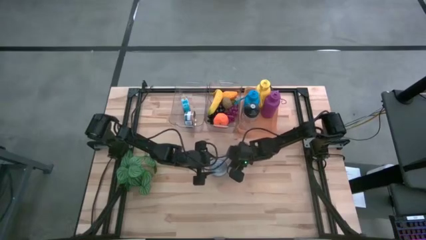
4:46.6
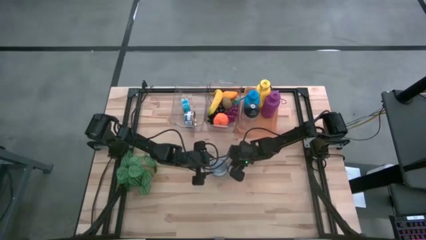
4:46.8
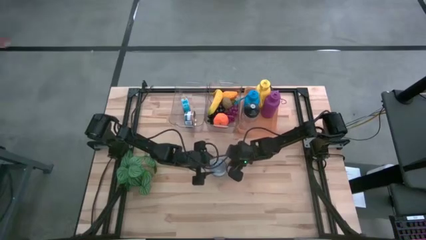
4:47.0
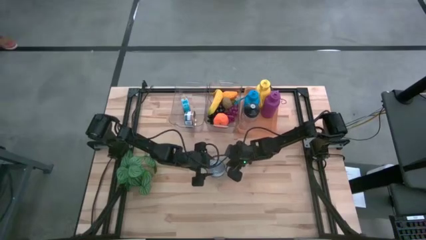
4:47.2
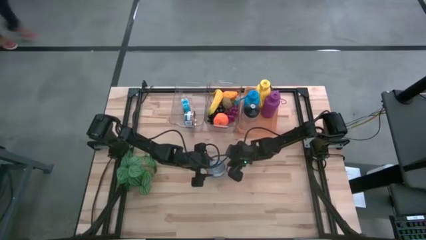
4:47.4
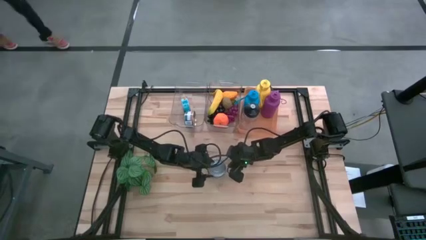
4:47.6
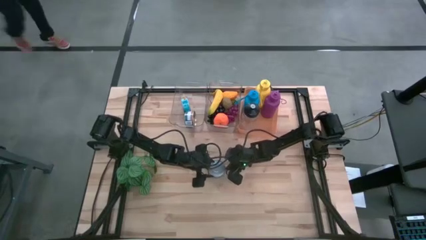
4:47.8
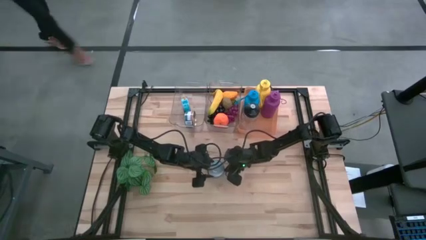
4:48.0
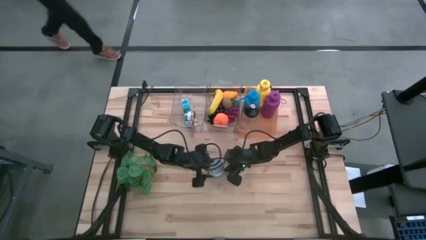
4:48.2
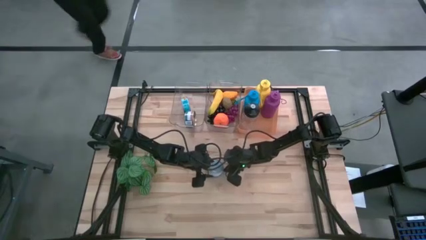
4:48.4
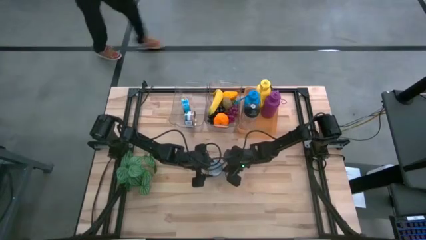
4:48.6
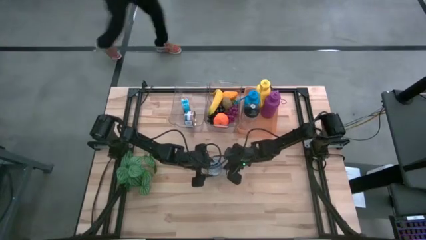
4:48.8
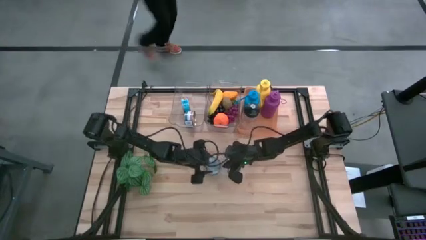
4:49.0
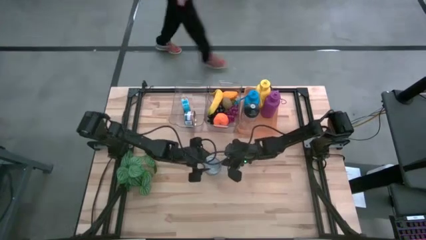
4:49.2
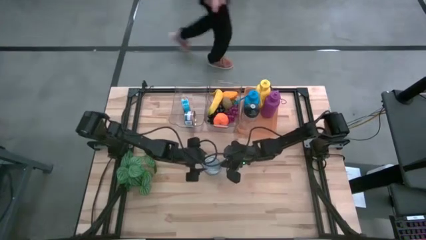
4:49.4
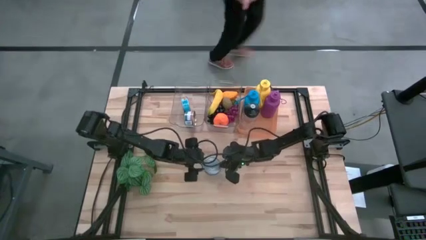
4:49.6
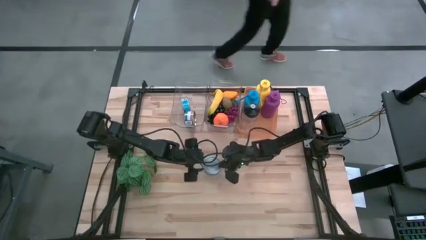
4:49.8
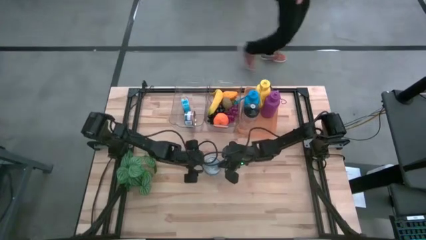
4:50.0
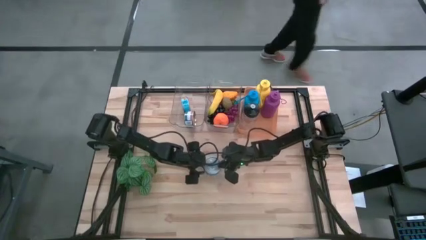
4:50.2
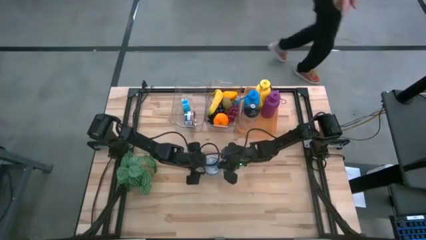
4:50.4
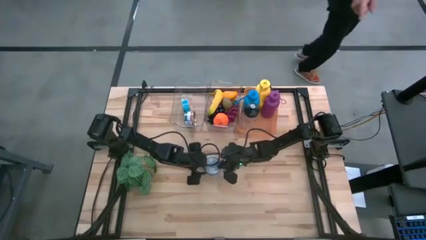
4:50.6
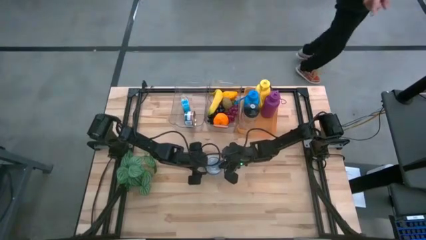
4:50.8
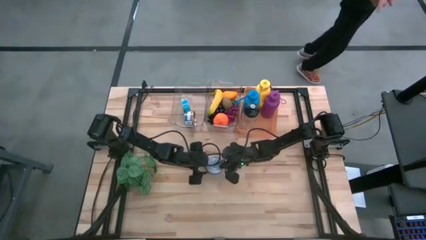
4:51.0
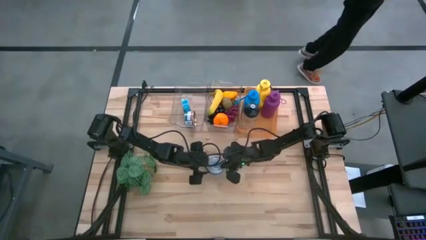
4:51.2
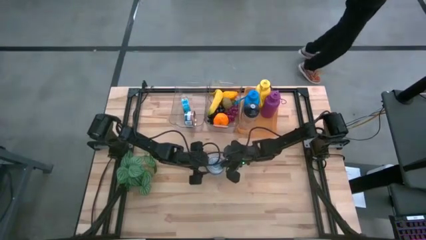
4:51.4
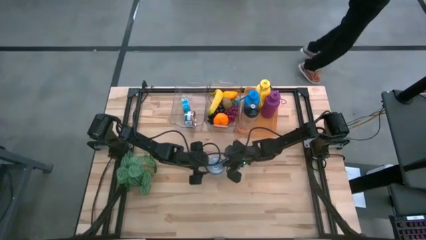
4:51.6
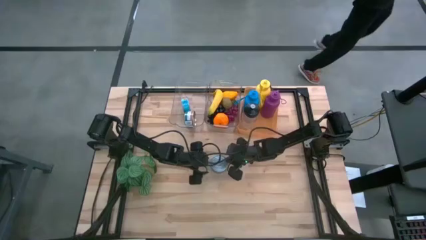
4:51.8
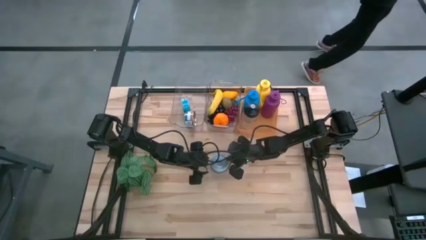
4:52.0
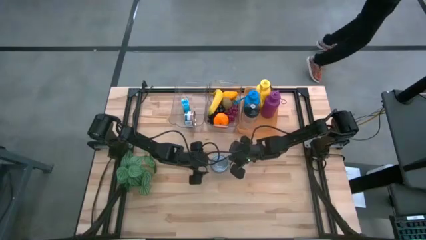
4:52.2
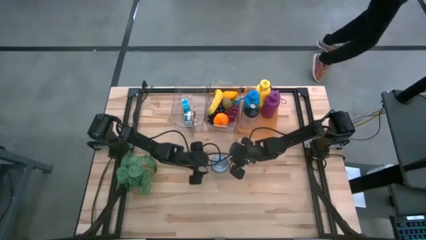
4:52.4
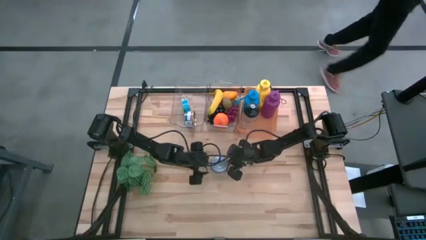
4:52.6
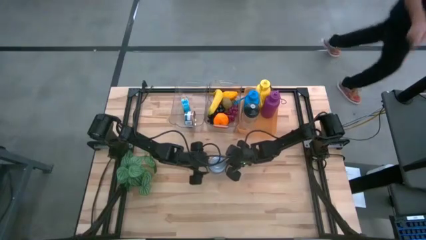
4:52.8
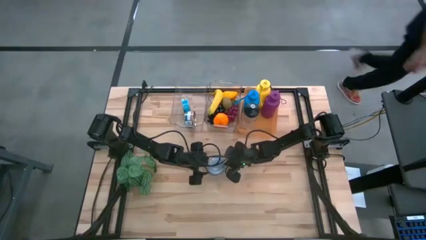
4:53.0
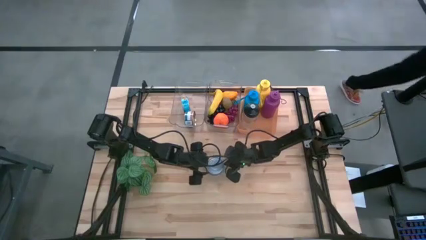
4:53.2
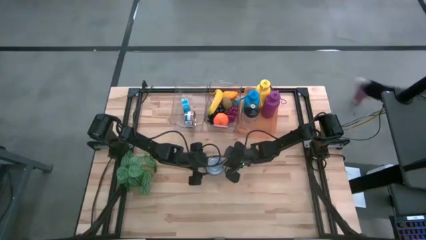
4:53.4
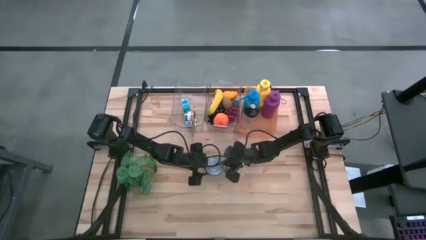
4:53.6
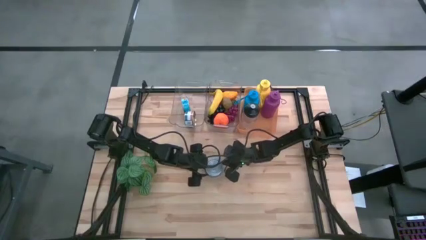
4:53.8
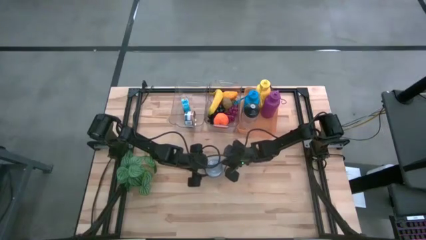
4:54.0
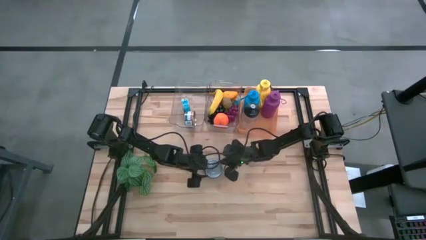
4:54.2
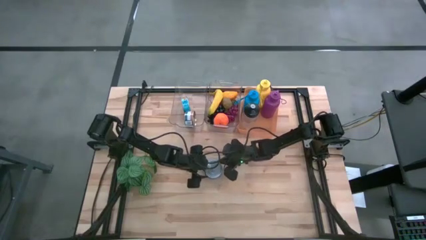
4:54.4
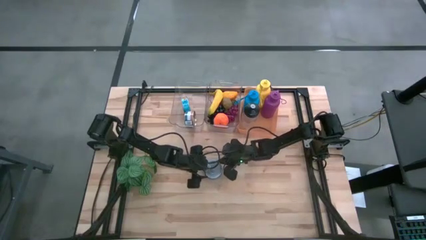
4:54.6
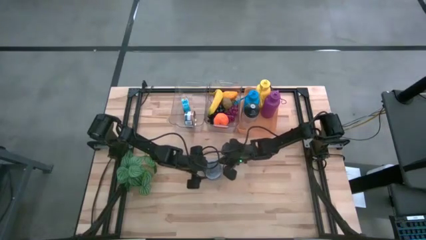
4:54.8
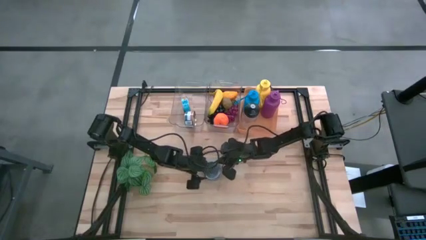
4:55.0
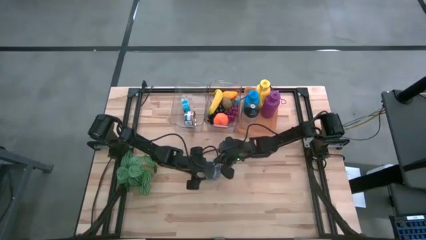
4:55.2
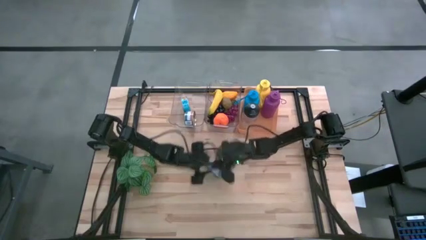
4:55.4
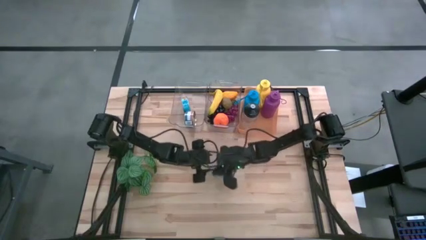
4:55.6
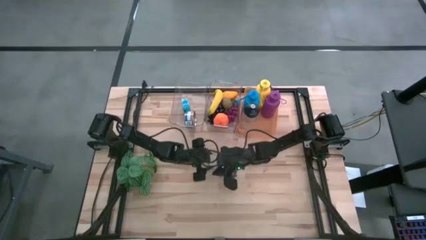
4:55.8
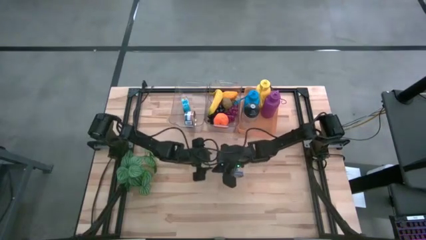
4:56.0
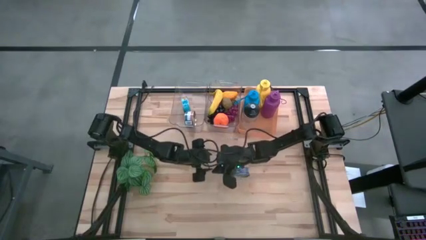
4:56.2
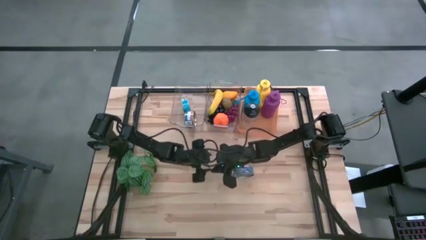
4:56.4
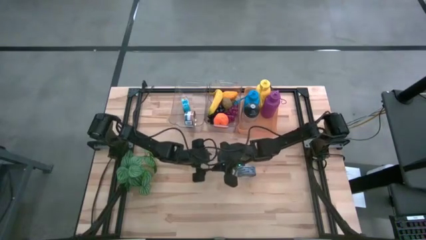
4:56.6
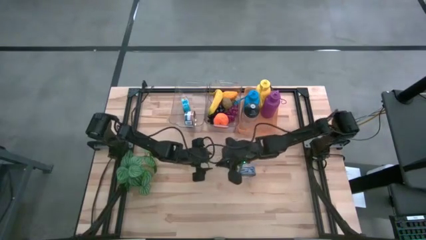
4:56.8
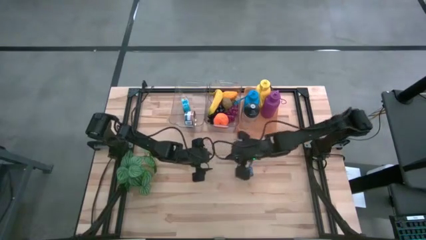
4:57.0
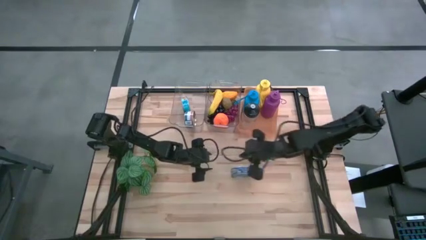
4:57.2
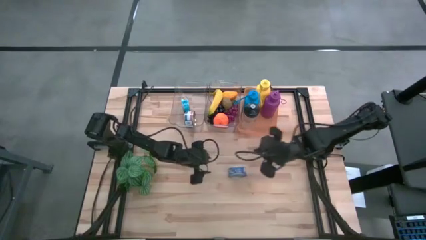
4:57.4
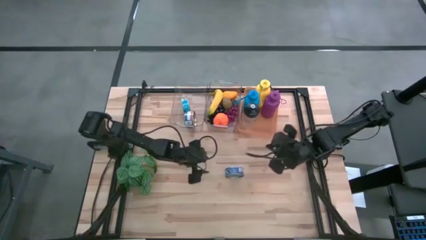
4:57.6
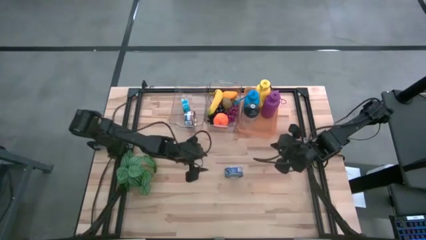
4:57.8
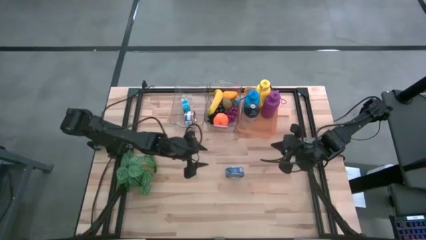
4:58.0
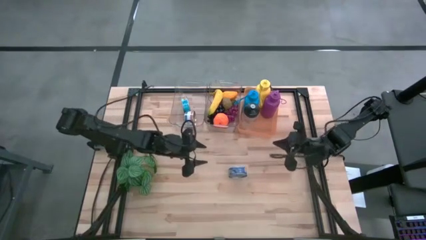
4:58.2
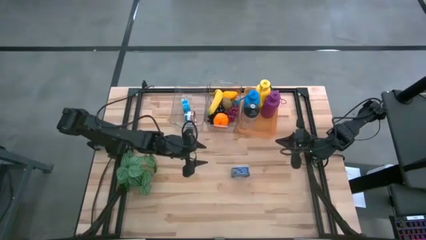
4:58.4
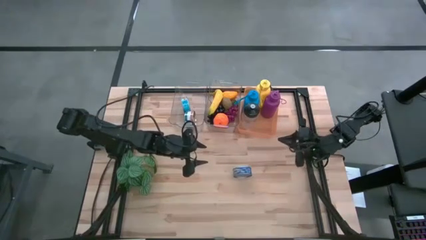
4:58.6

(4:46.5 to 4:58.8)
Task: Pick & Place Food Item
Put the blue tuna can into the left transparent bin
